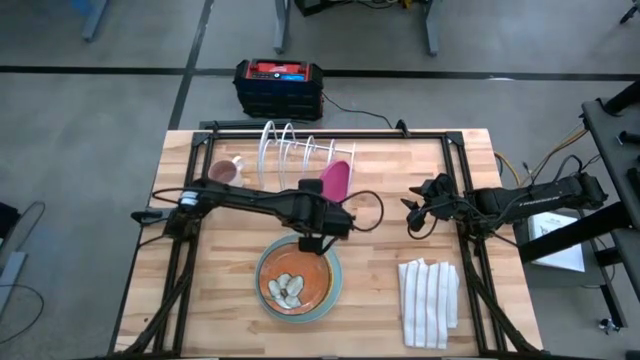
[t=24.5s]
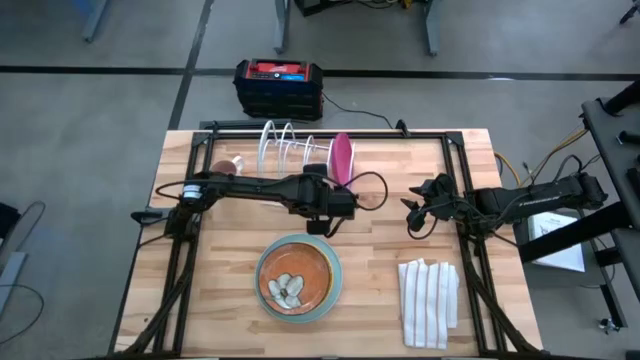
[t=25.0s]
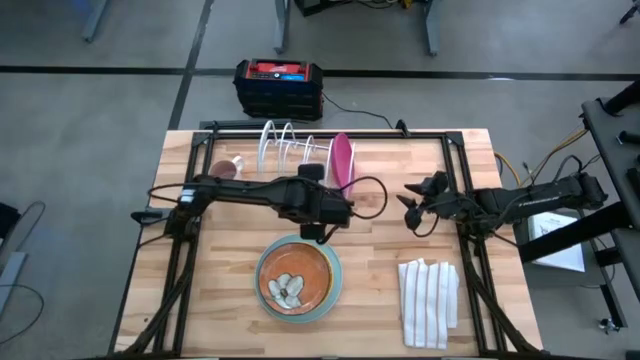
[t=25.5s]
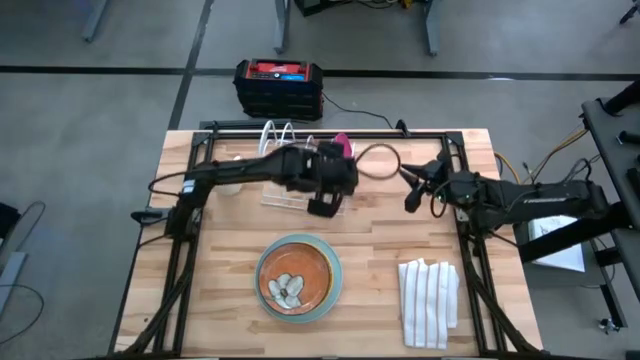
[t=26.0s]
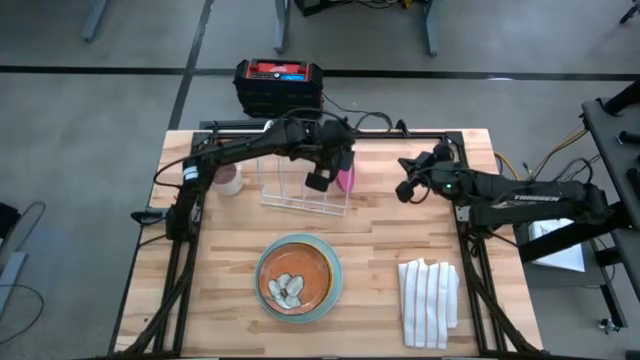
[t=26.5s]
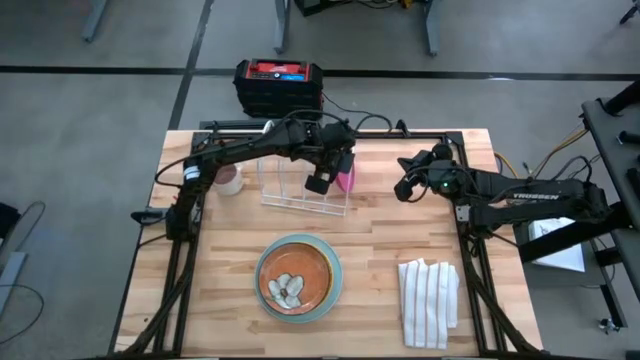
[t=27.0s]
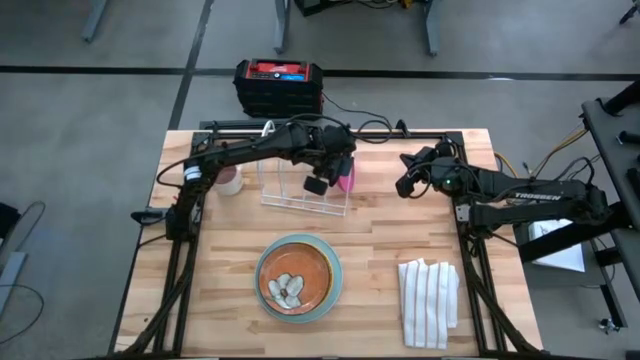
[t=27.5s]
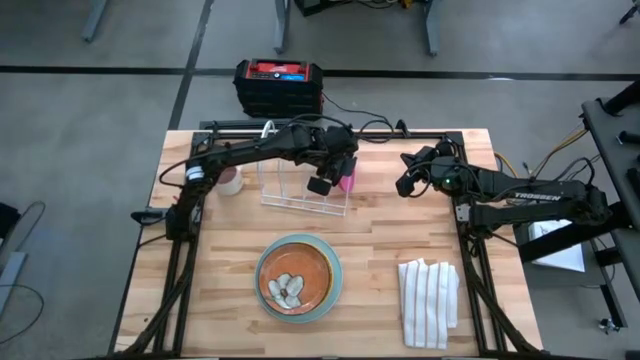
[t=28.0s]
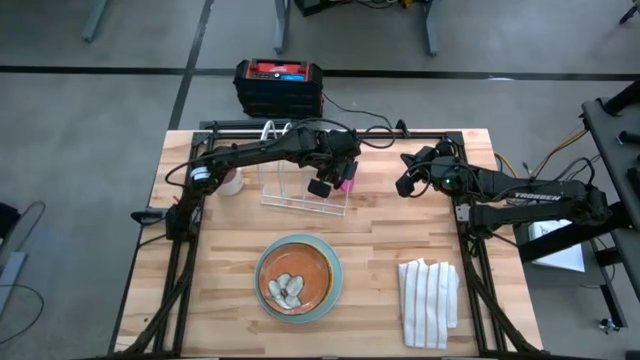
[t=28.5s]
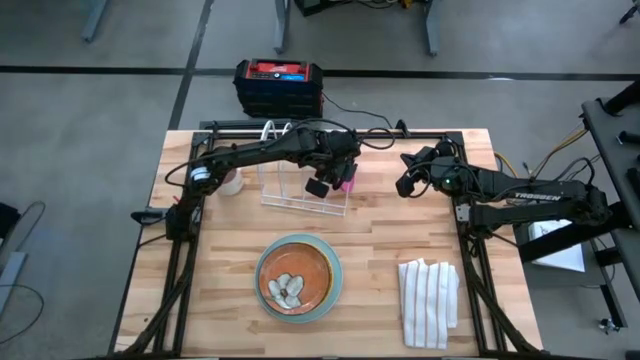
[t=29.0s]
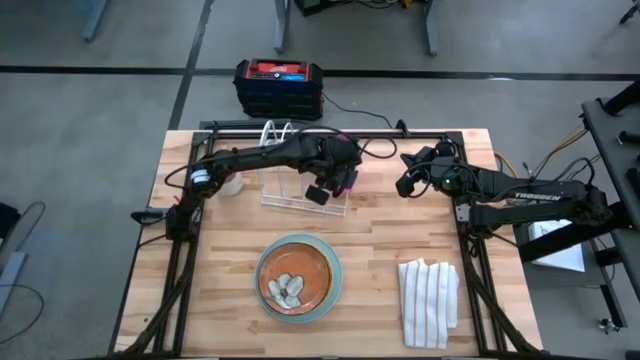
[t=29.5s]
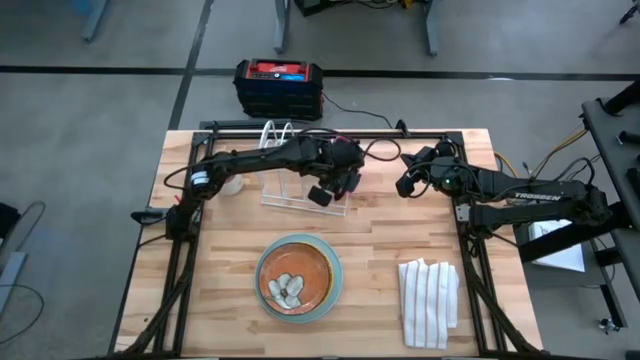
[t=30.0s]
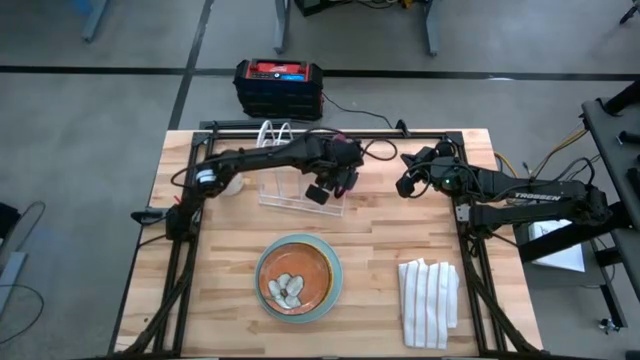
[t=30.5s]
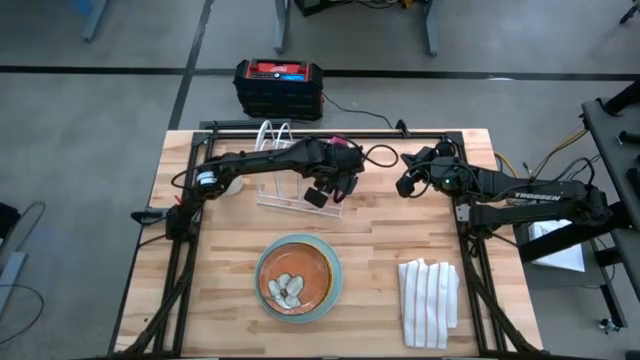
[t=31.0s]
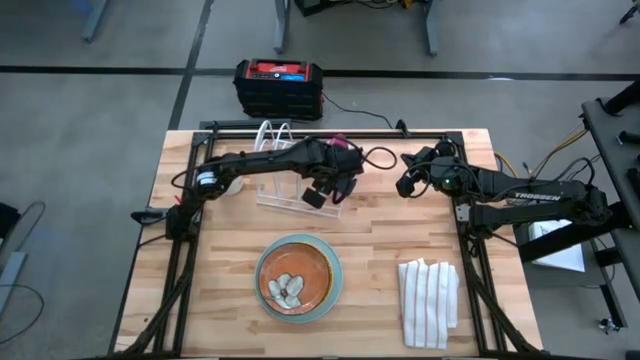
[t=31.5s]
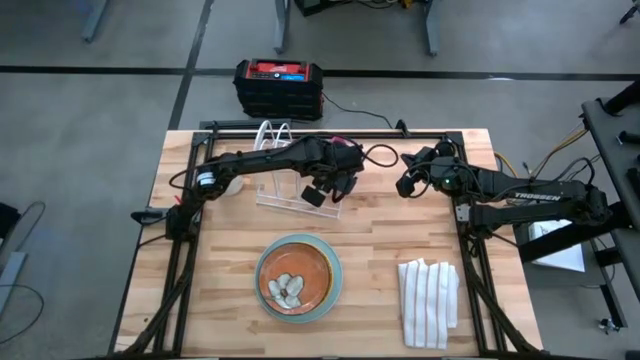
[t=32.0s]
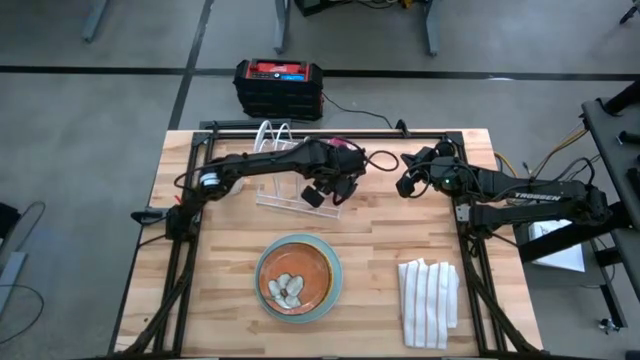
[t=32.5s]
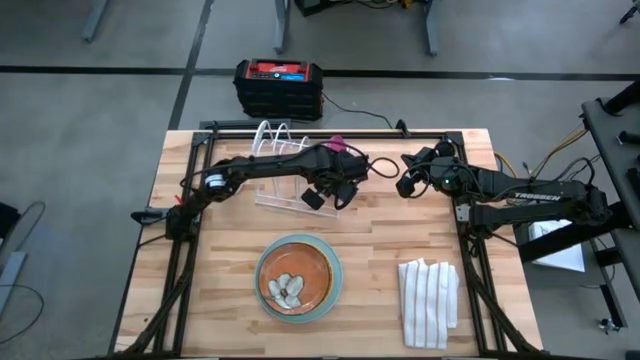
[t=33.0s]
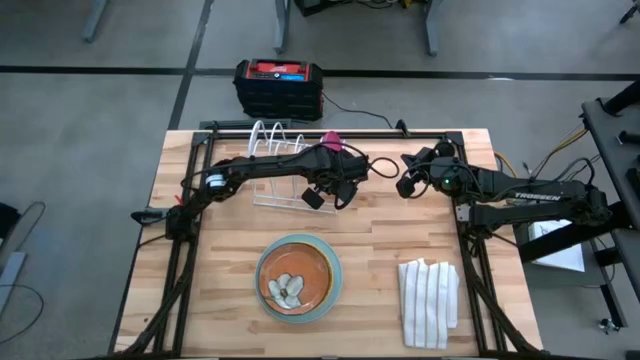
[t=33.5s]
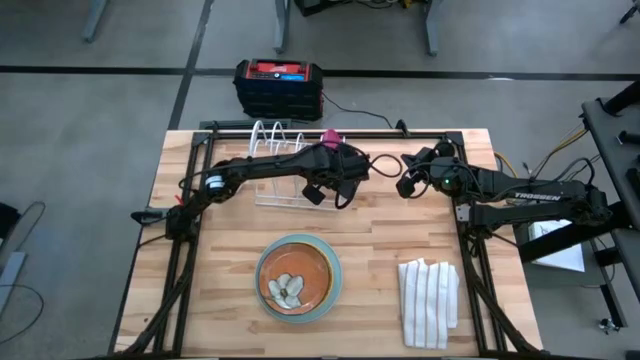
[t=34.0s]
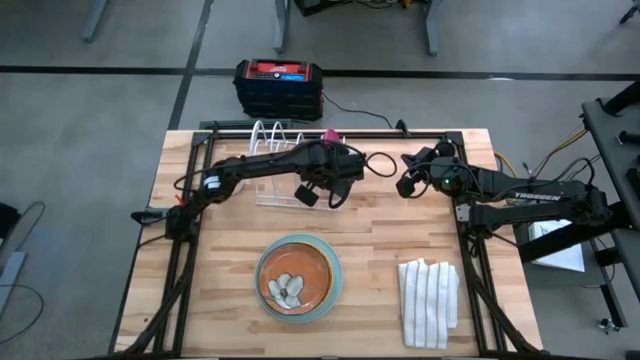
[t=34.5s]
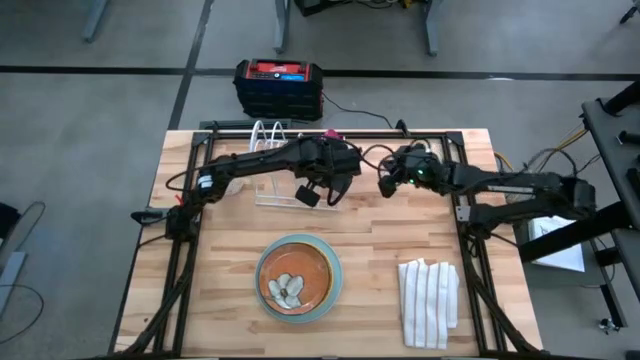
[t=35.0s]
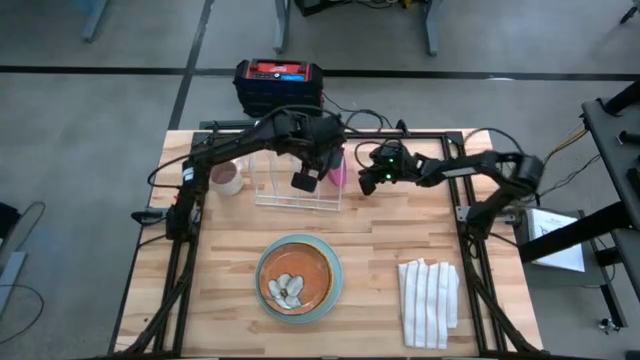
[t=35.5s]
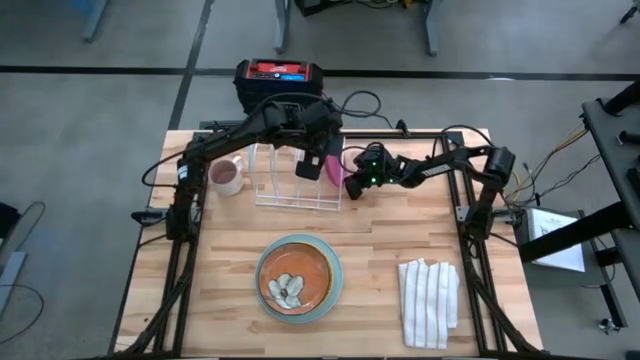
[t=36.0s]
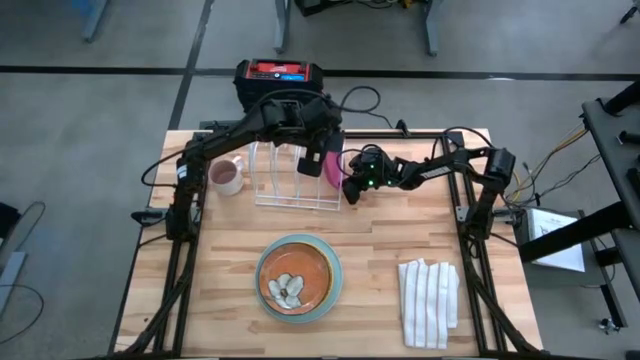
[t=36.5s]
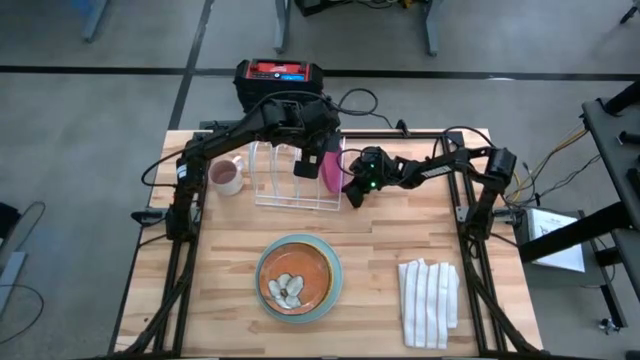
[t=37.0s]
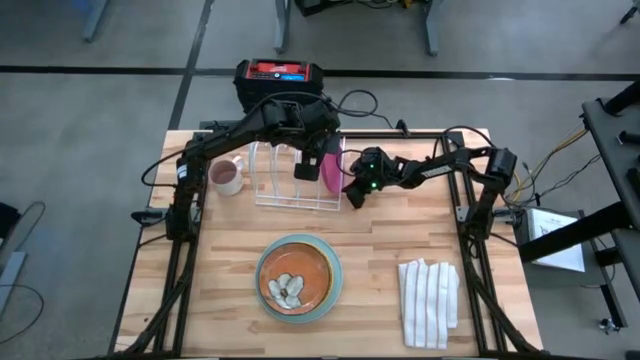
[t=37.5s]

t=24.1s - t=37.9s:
Task: Sort dishes
Put the pink plate into the dish rack

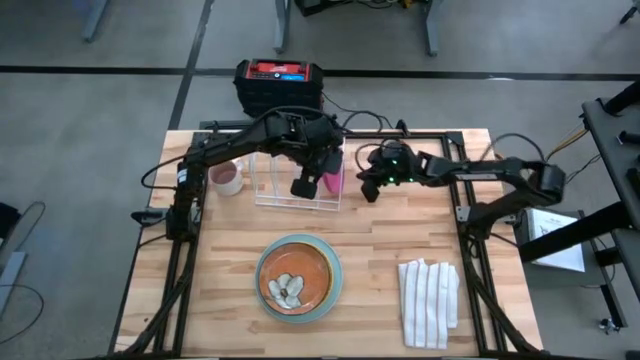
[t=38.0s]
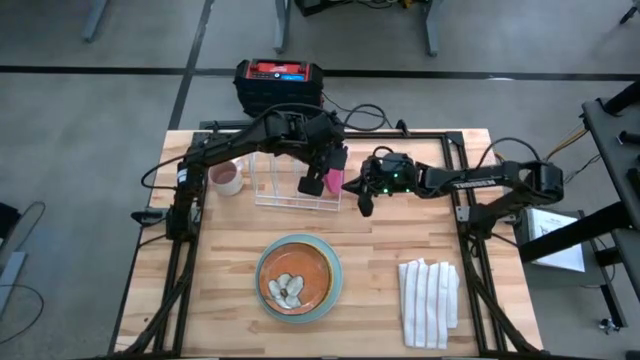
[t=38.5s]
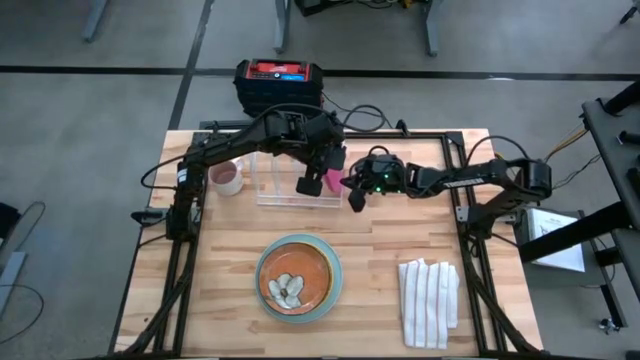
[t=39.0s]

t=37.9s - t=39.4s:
Adjust the dish rack

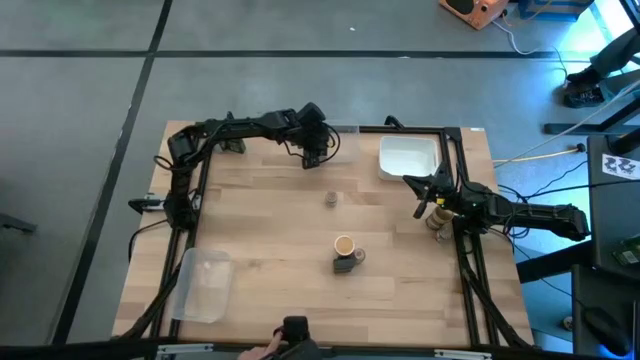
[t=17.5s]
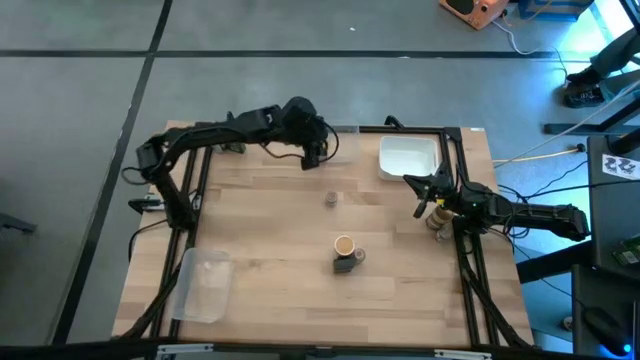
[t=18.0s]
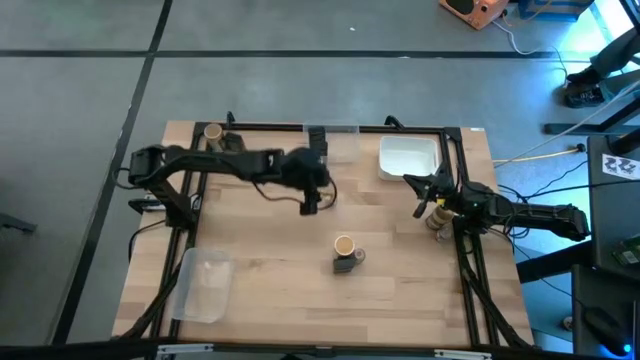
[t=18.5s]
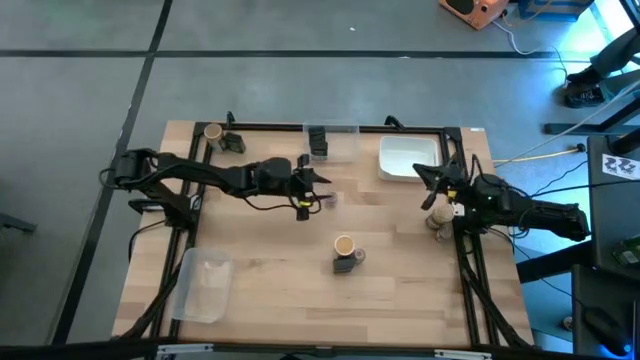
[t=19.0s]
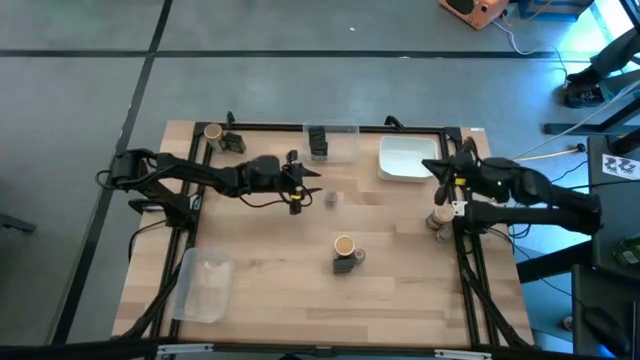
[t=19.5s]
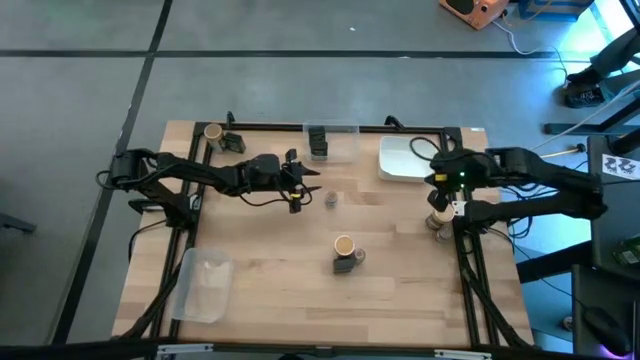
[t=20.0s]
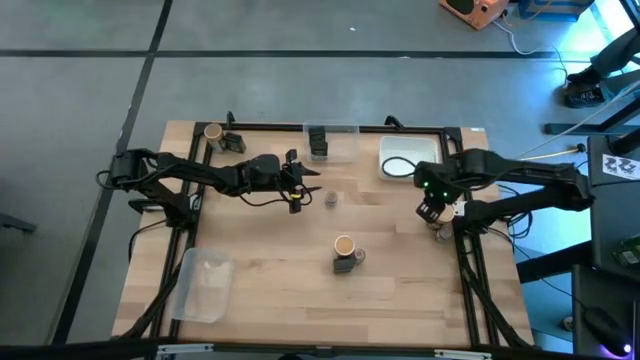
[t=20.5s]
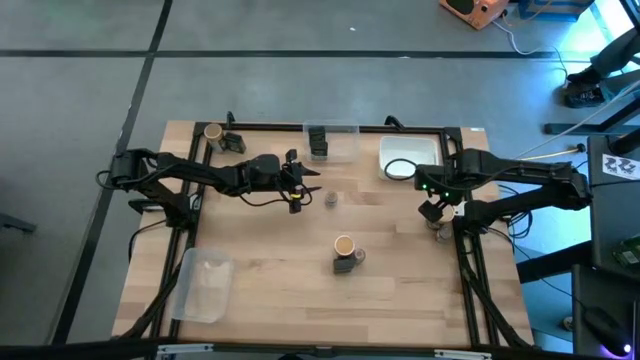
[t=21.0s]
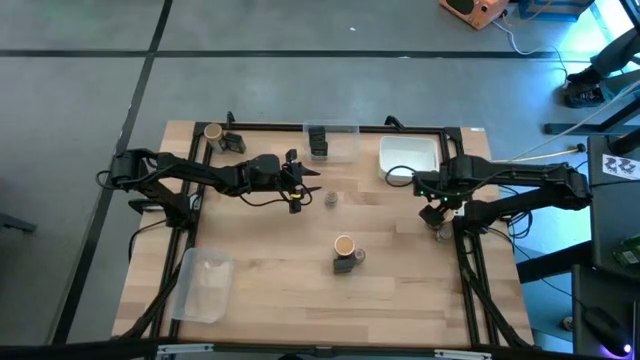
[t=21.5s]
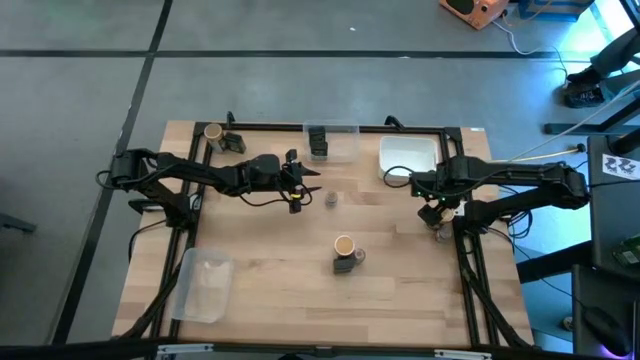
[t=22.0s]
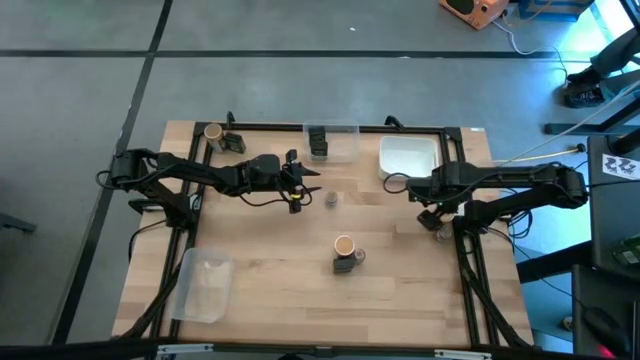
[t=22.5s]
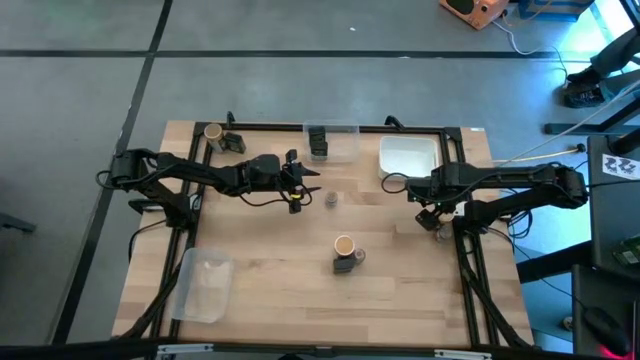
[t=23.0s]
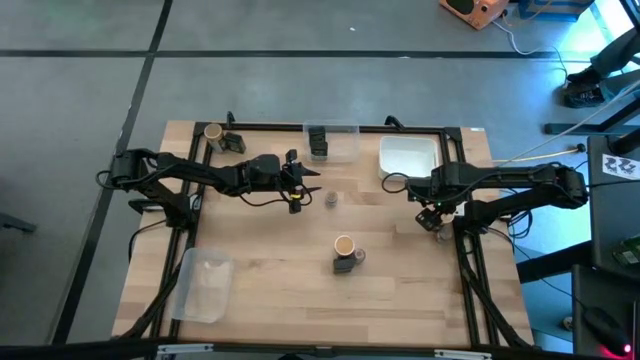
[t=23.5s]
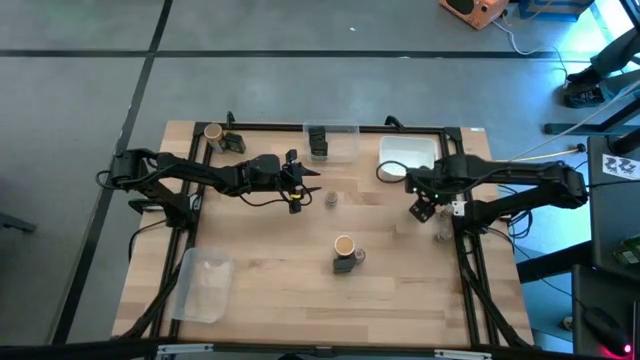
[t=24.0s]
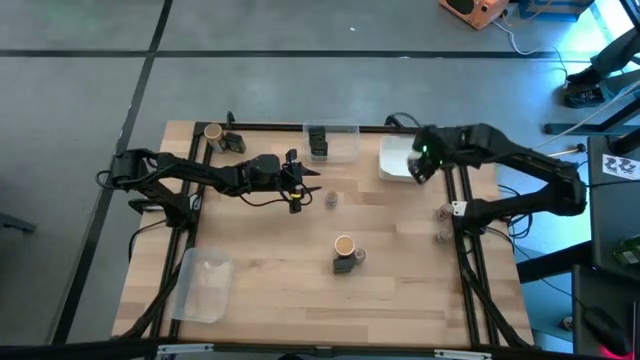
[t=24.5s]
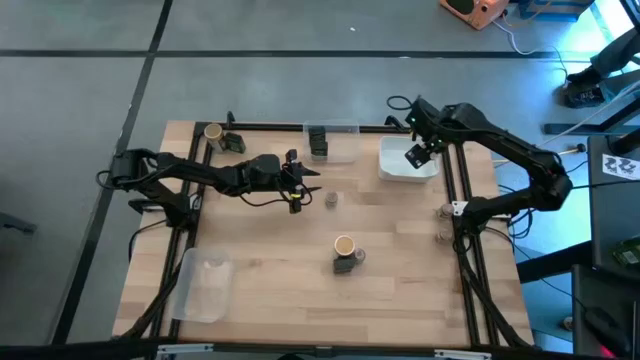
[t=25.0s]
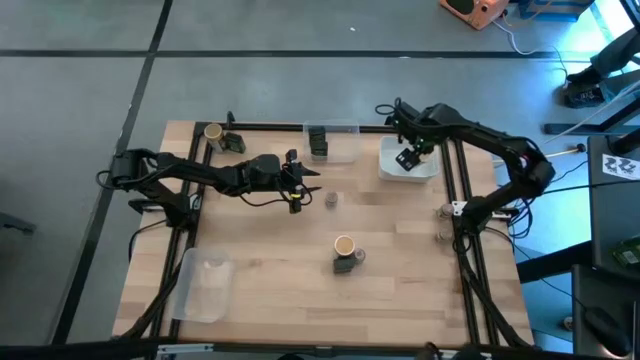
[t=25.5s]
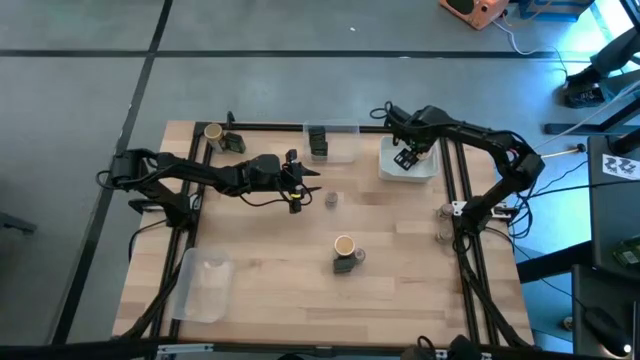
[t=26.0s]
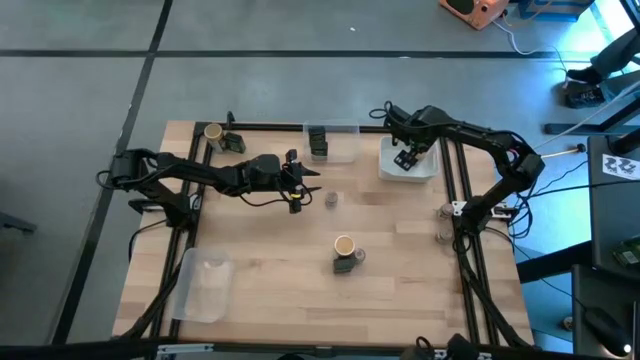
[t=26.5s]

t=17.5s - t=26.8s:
Task: Sort spices by type
Put the right brown seasoning bottle into the white bin
